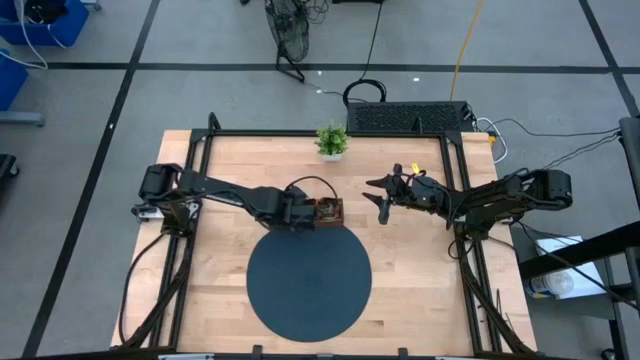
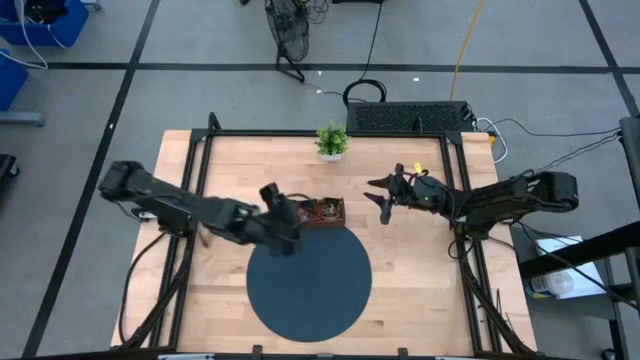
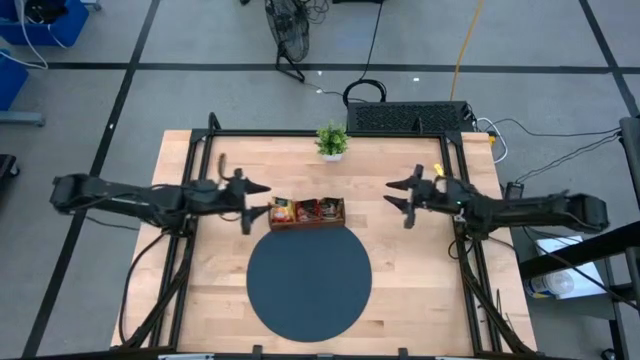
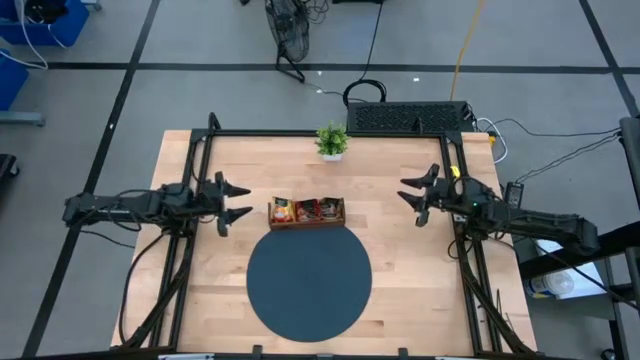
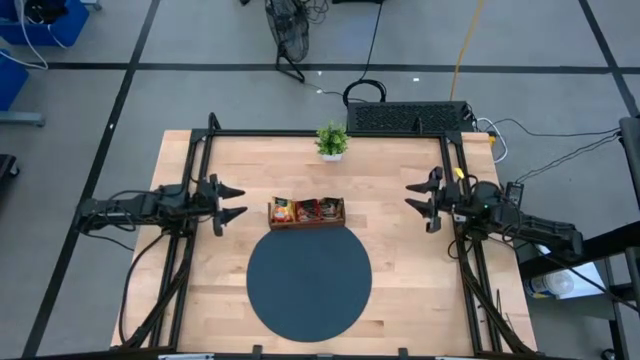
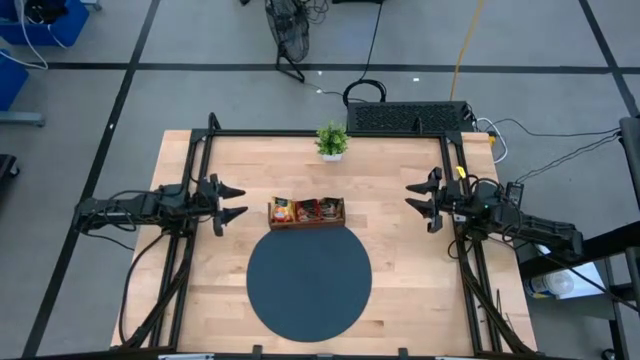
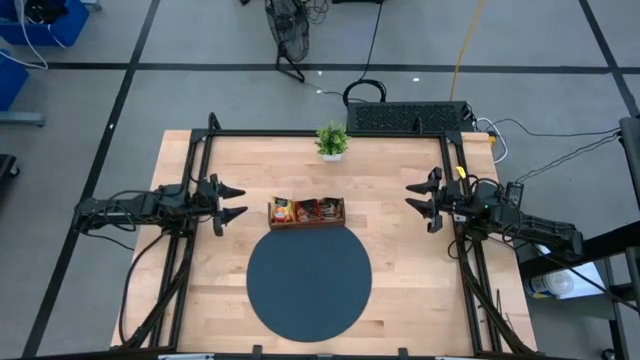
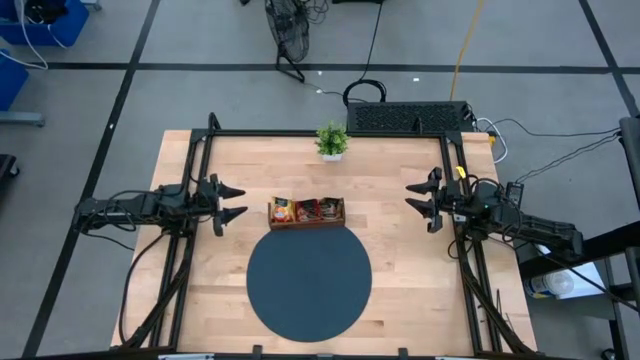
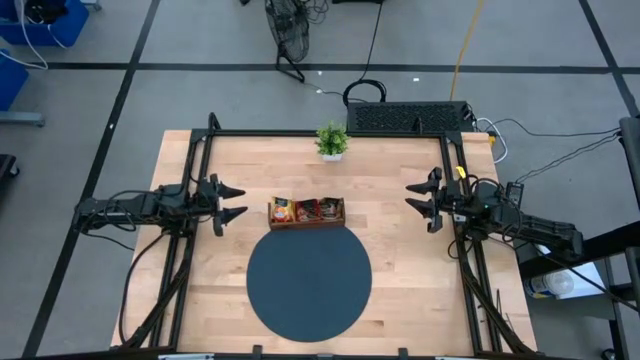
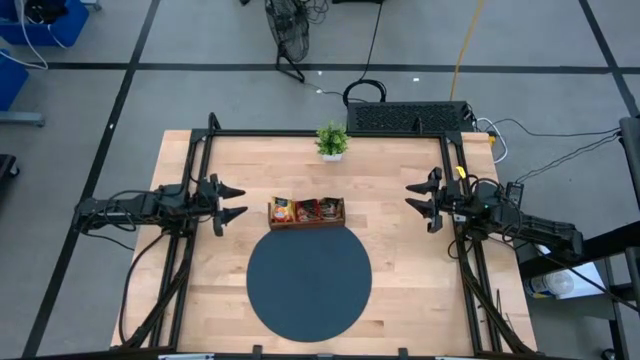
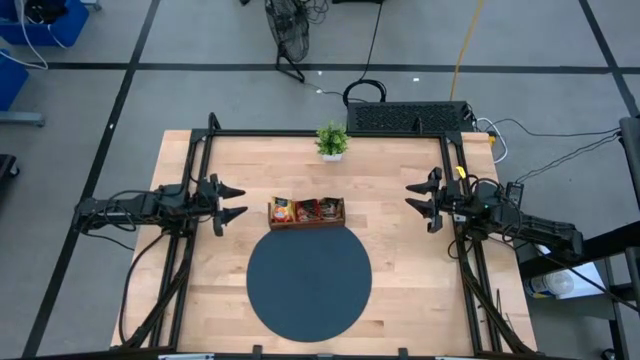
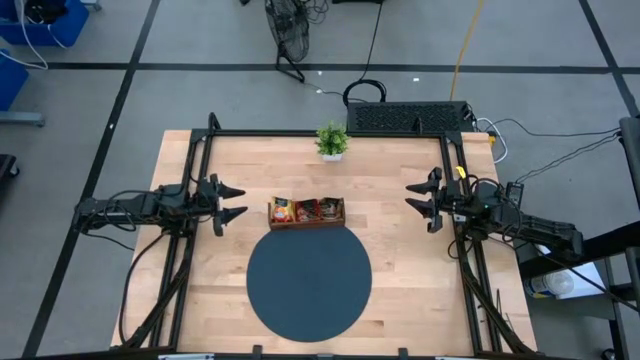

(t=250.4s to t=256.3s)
Task: Pick & Place Tea
Return to Home Position

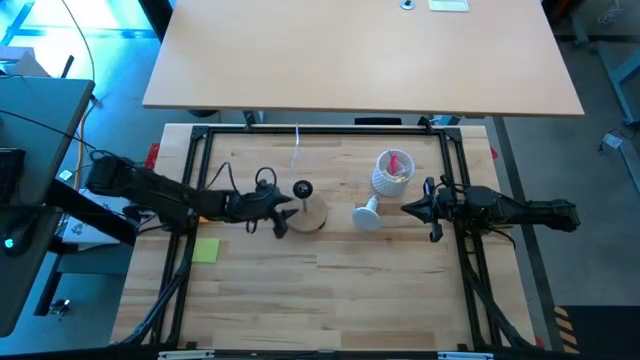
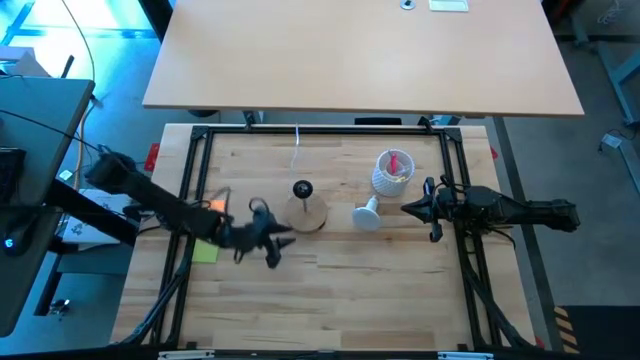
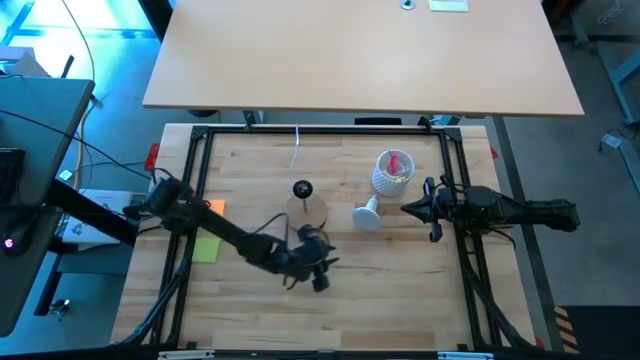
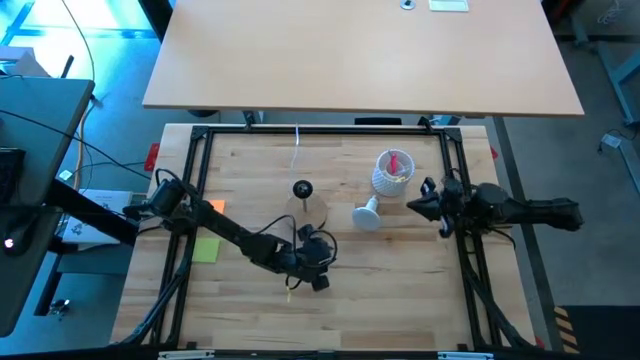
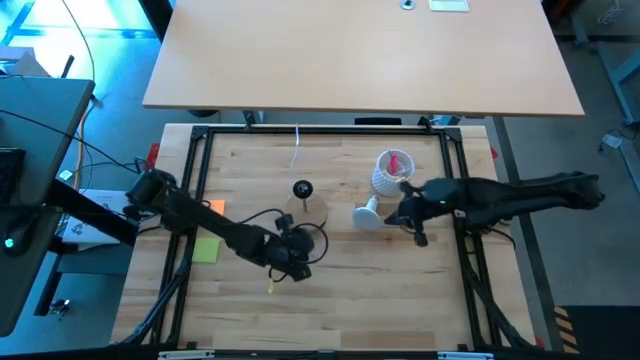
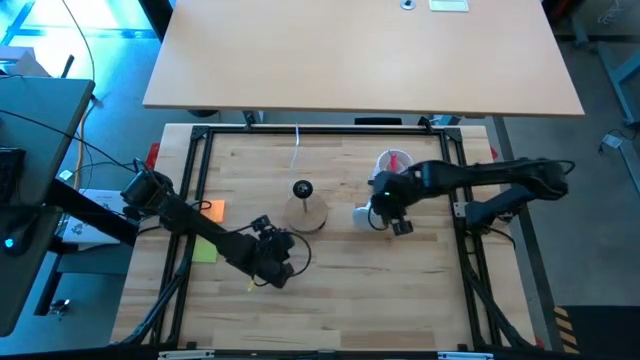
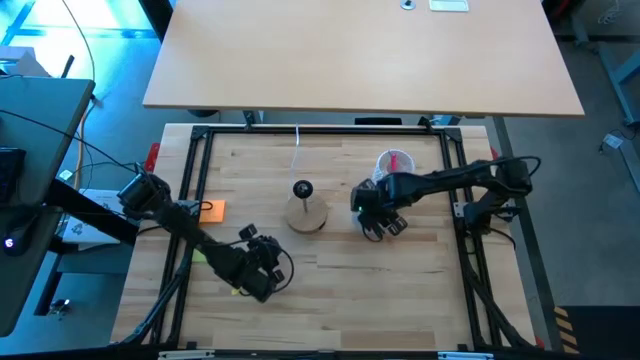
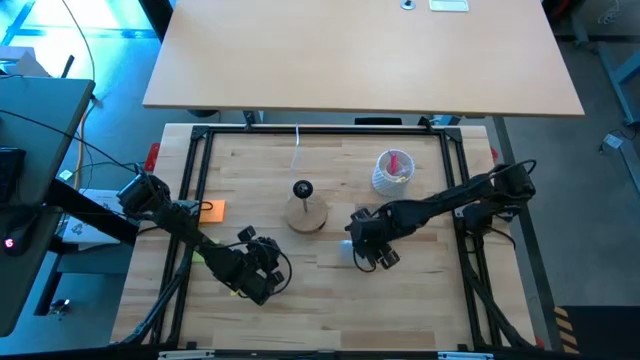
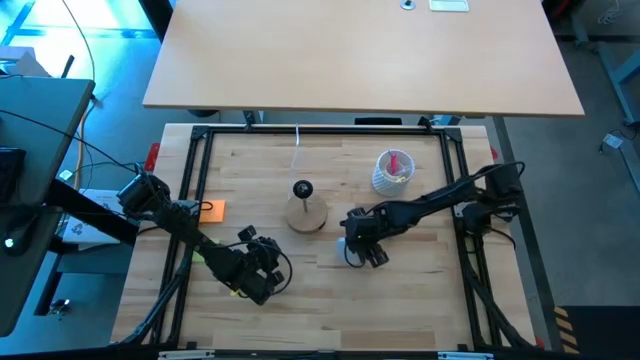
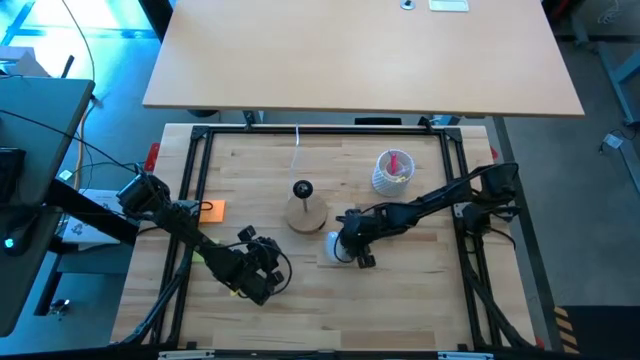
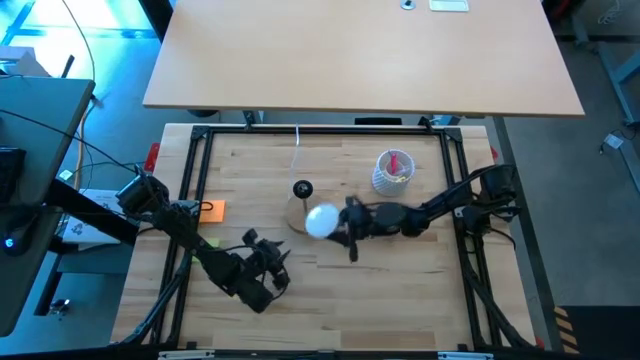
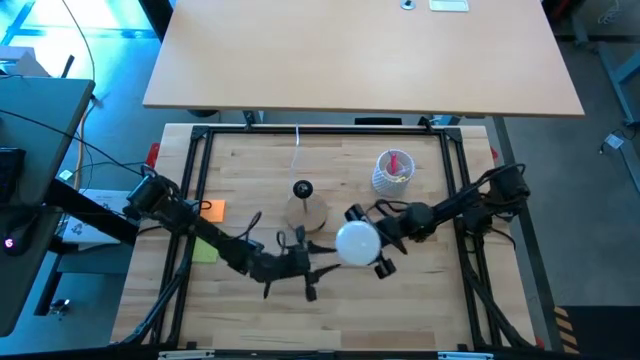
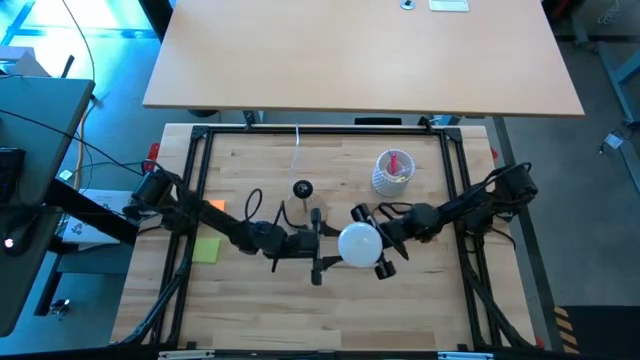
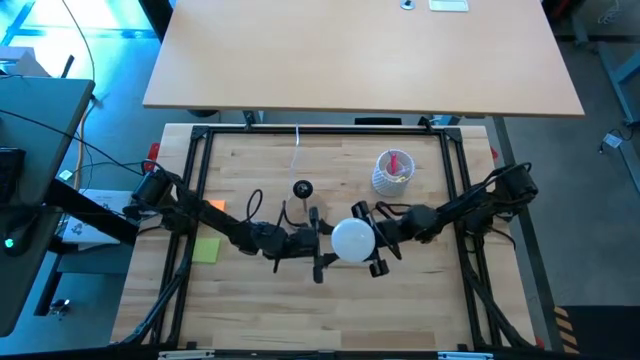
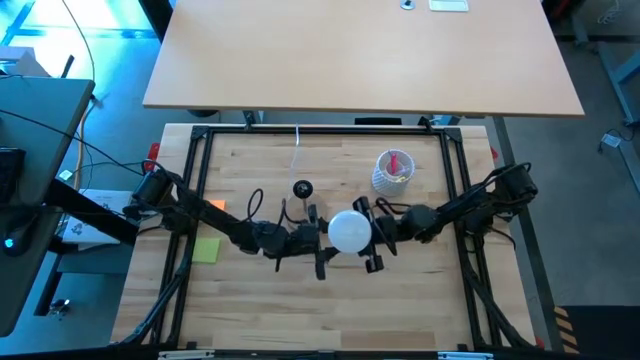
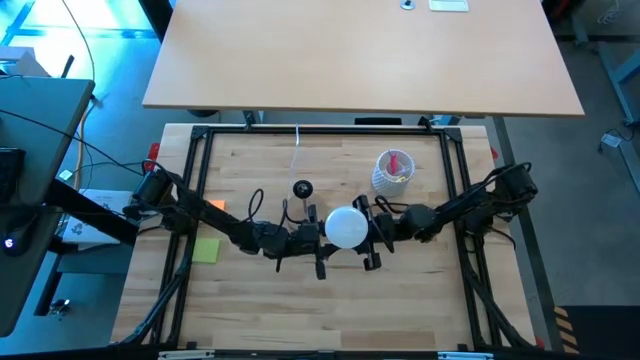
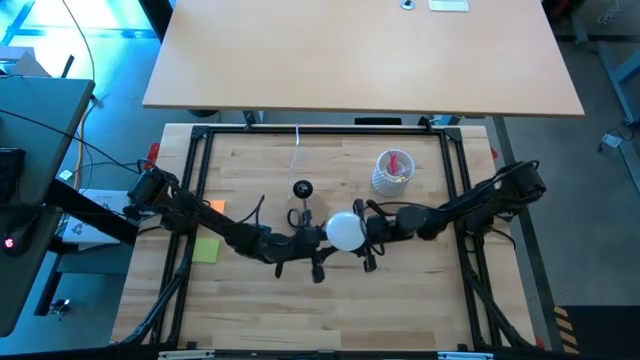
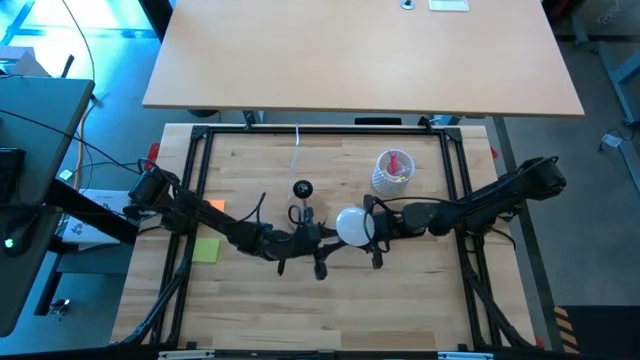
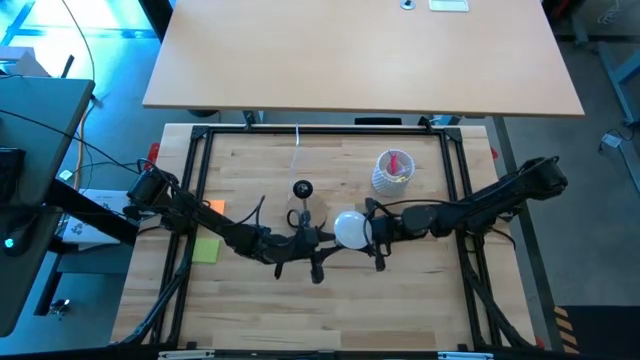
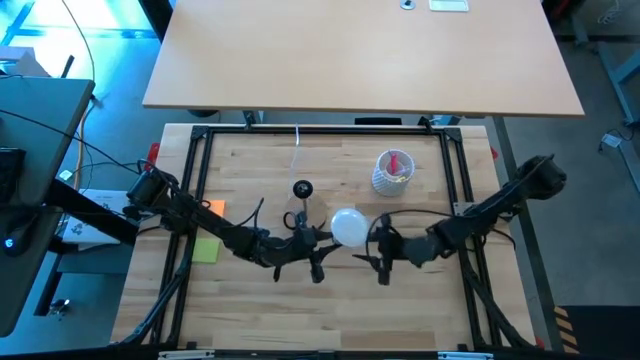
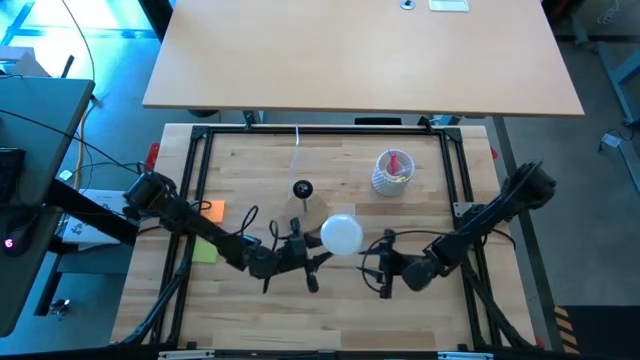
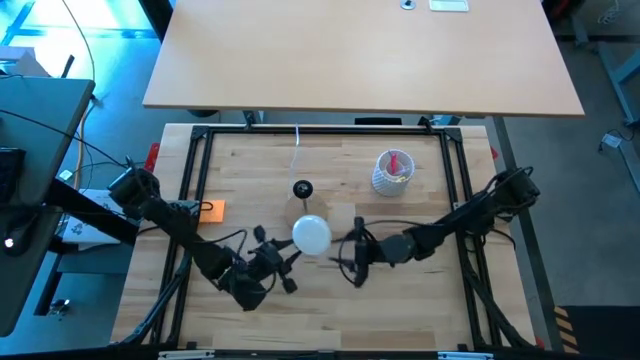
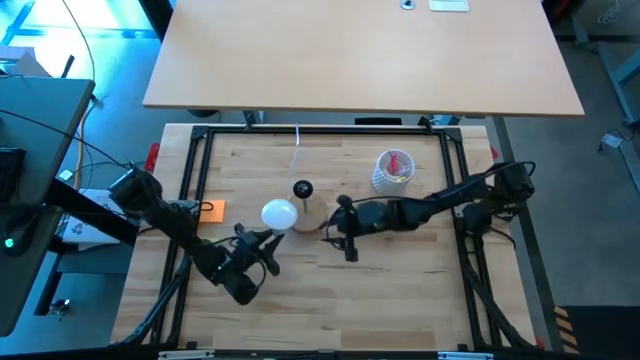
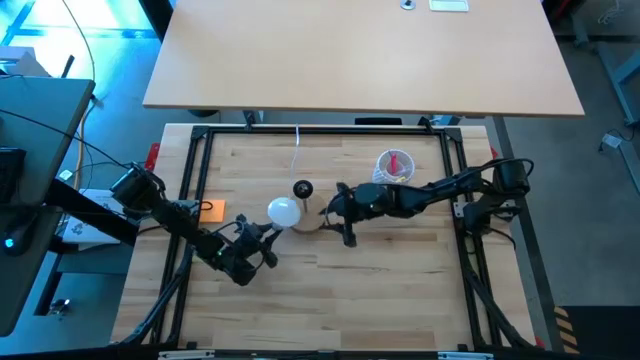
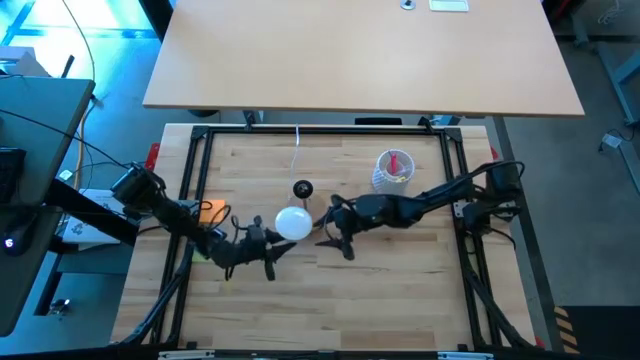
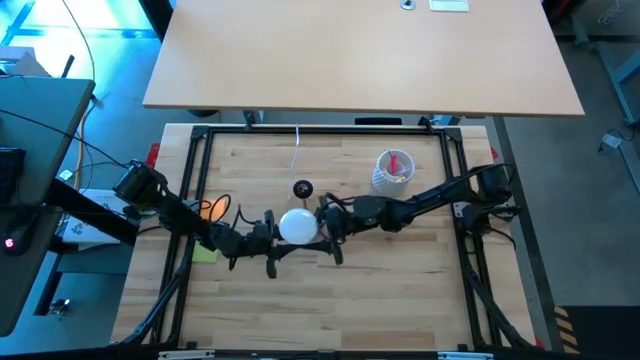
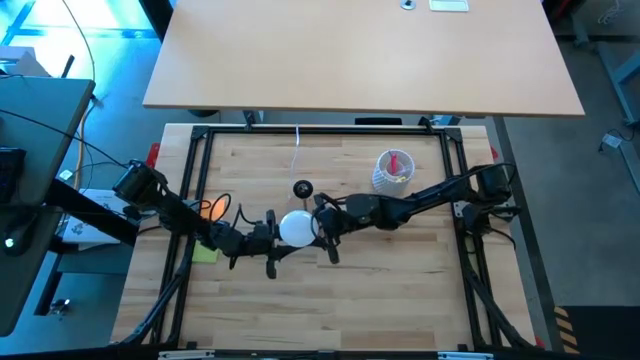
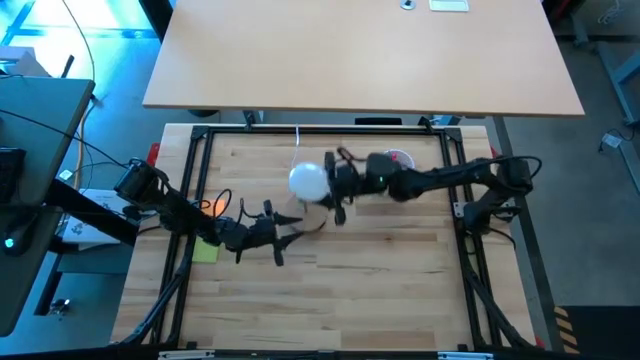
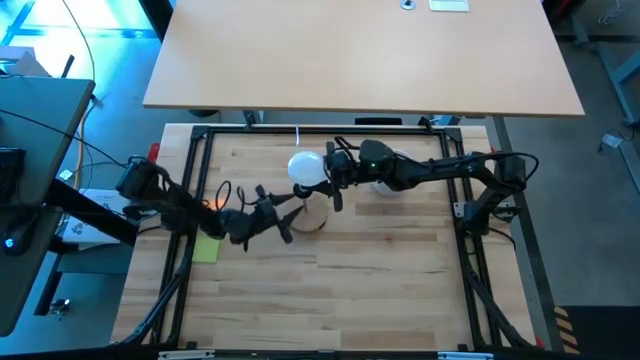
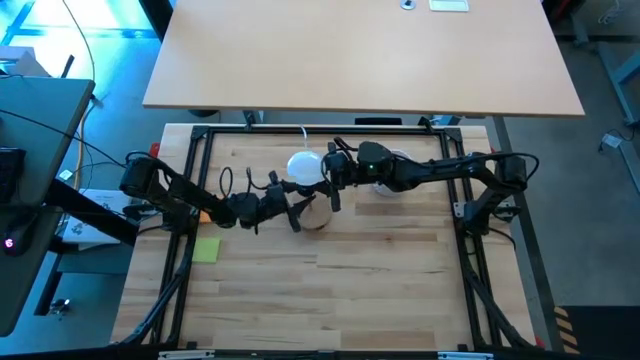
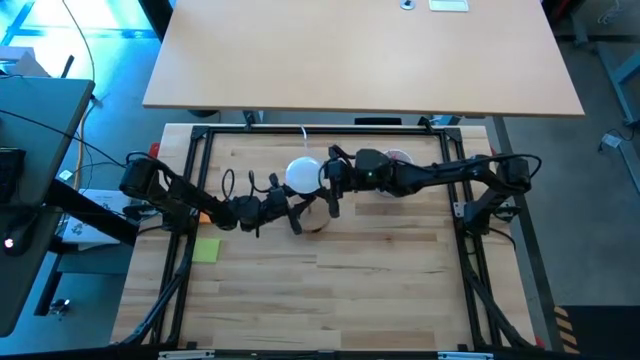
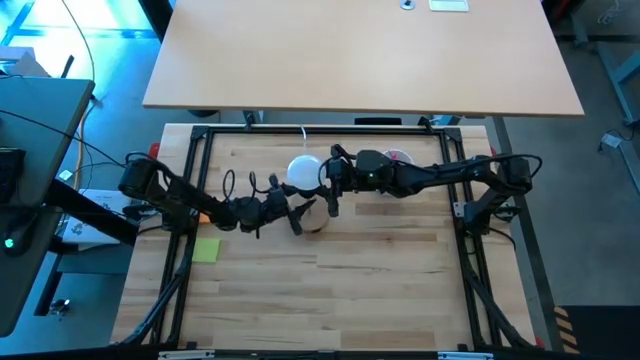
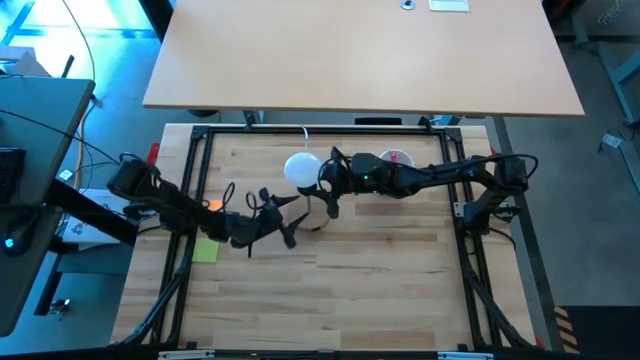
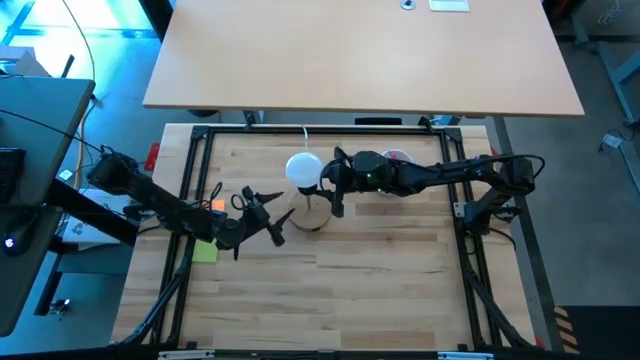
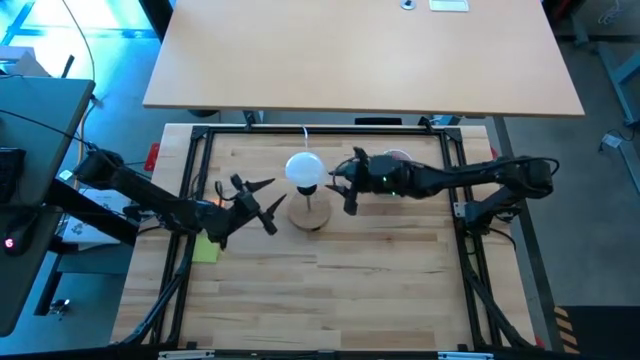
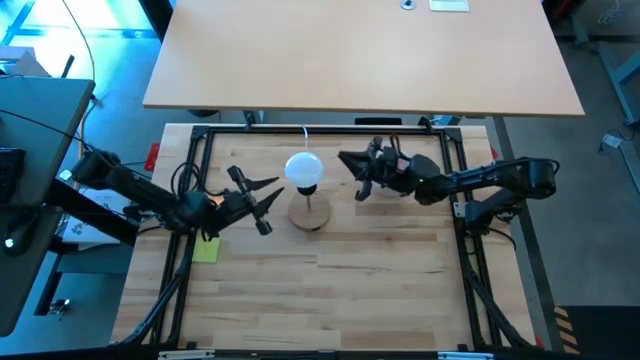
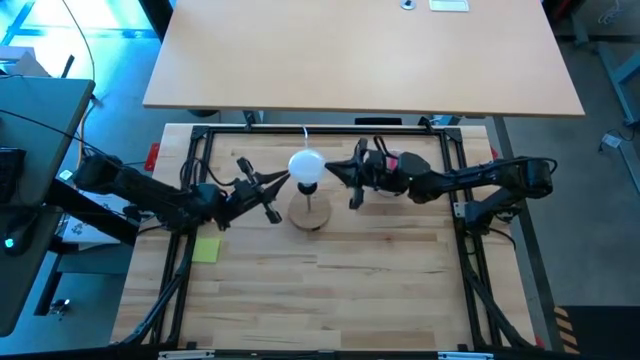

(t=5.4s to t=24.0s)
Task: Screw lightbulb
Insert the lightbulb into the lamp
